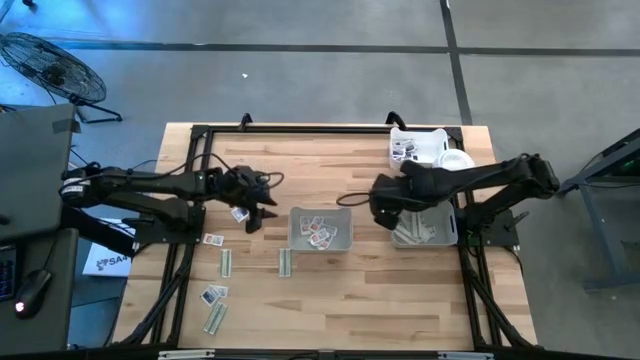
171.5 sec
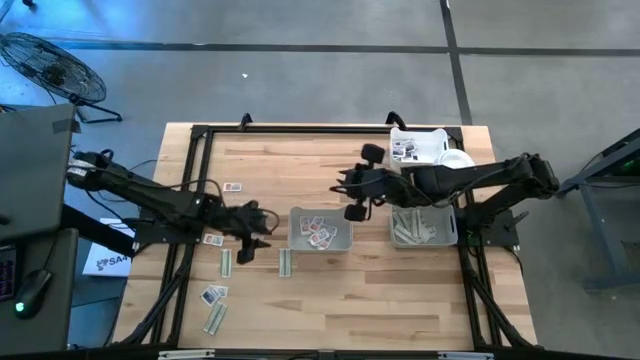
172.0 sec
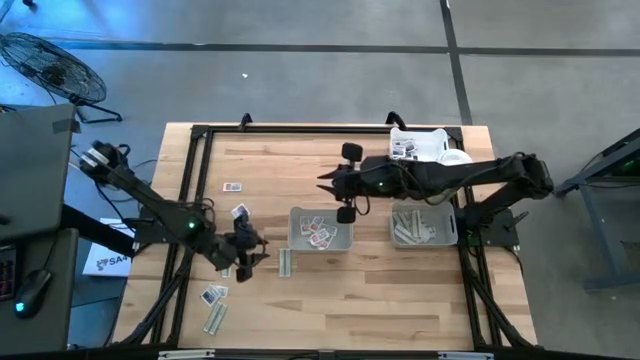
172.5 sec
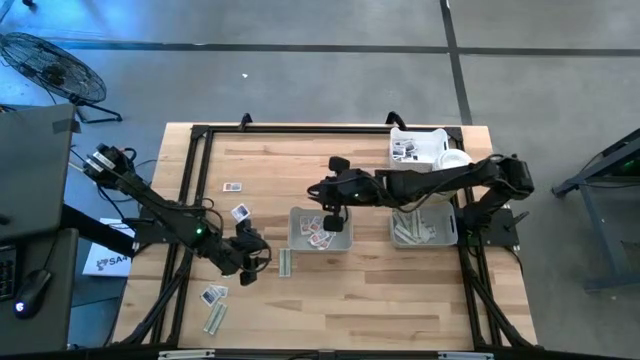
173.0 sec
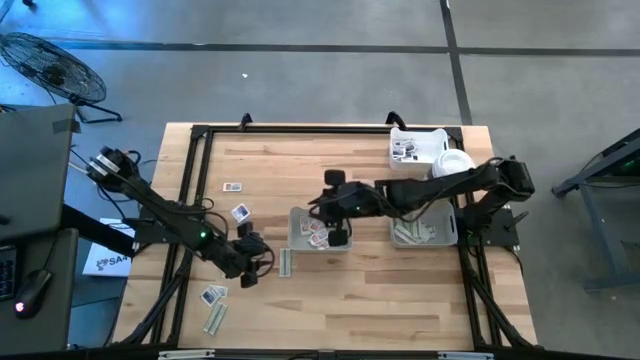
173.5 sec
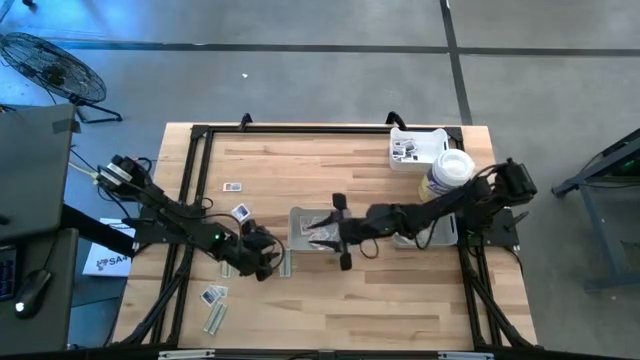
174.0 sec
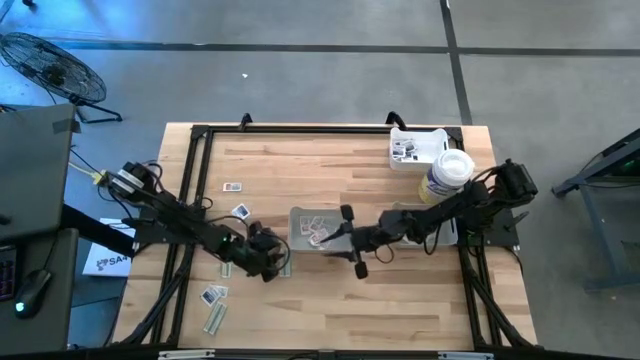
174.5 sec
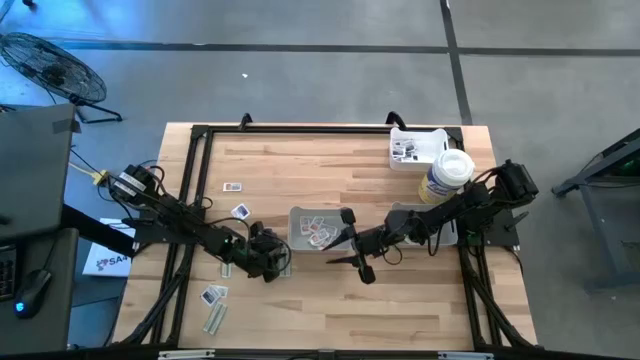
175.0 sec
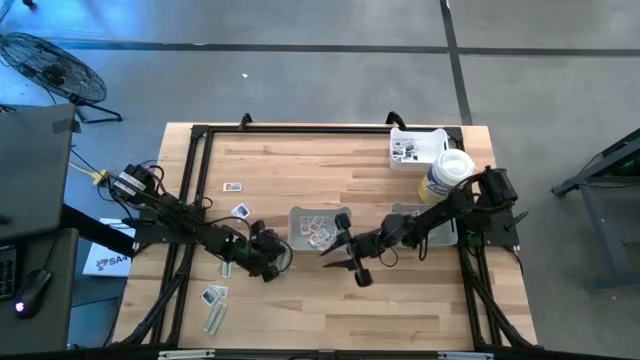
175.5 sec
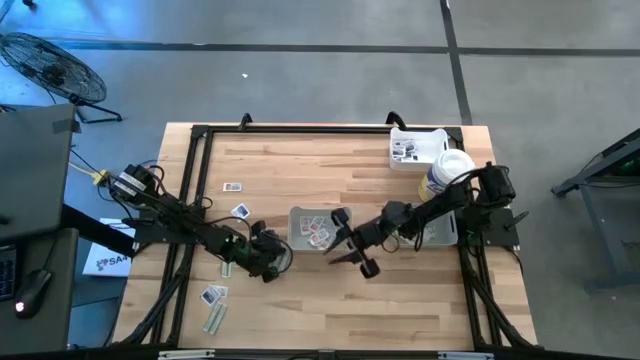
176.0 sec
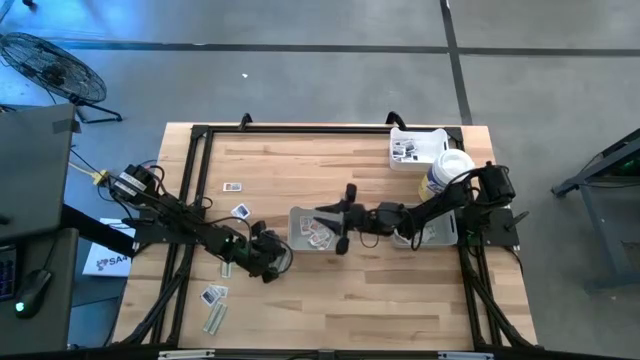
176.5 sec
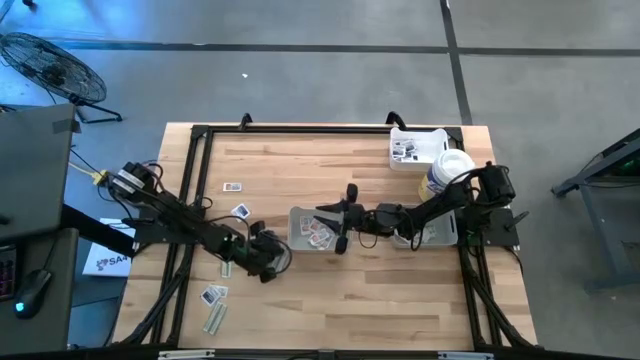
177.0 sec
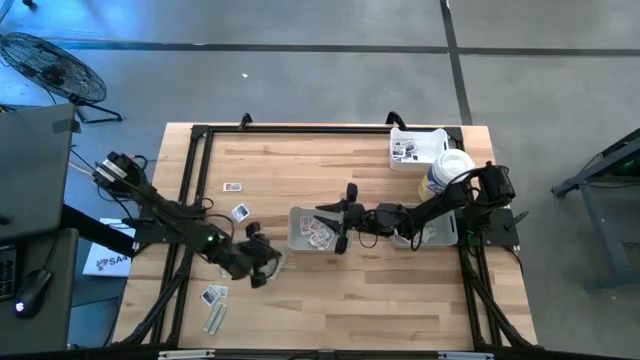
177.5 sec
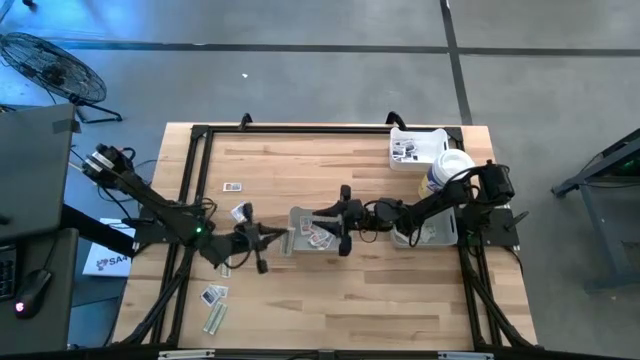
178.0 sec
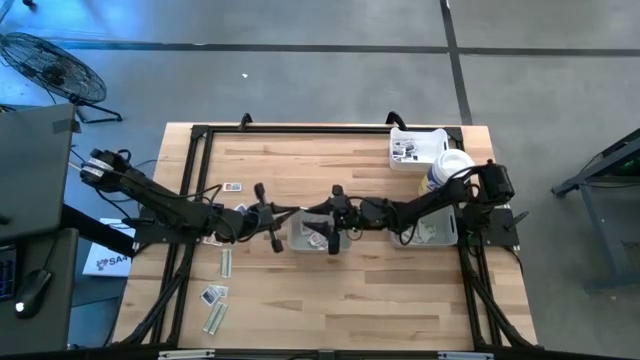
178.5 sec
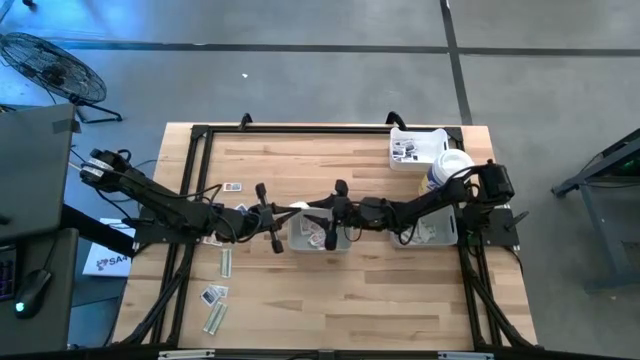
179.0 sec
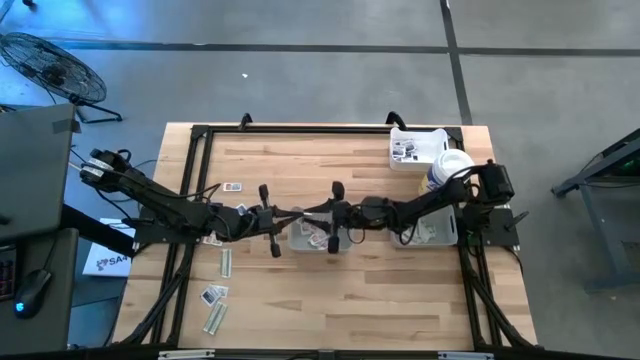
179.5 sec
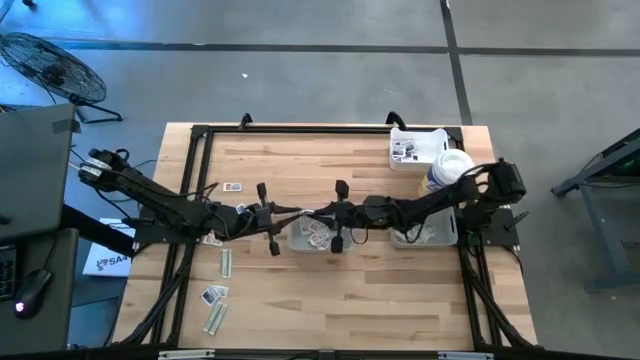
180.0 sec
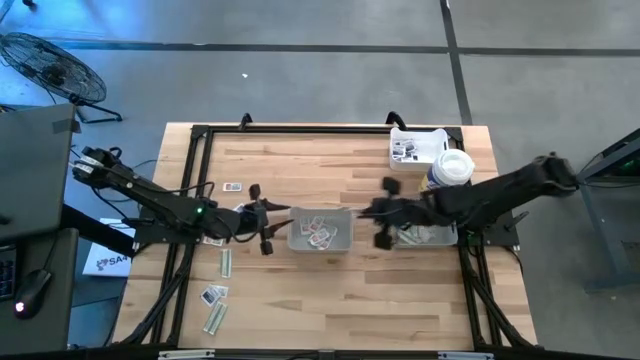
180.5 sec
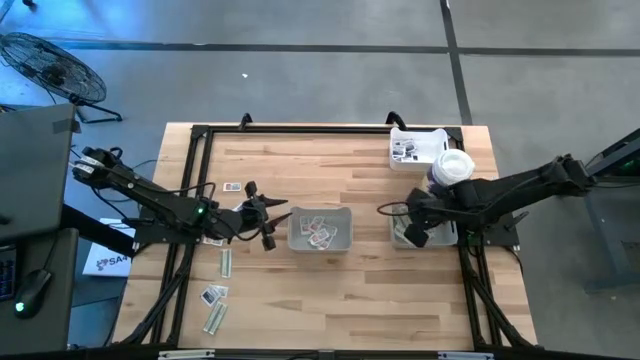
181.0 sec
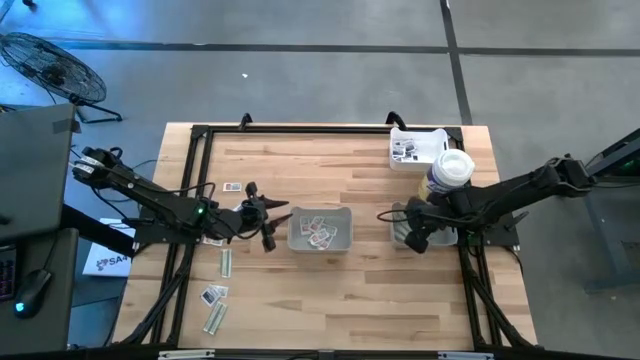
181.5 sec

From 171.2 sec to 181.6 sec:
Task: Pick & Place First Aid Supplies
Put the green pad into the right gray bin

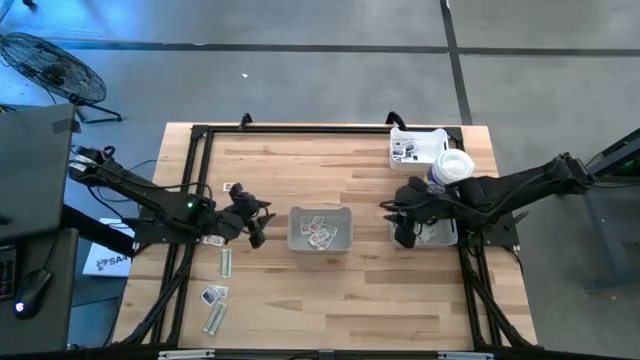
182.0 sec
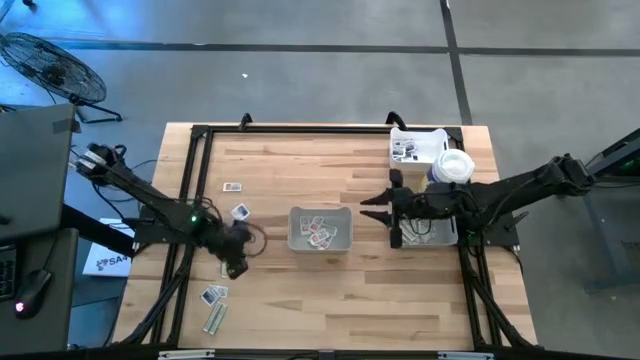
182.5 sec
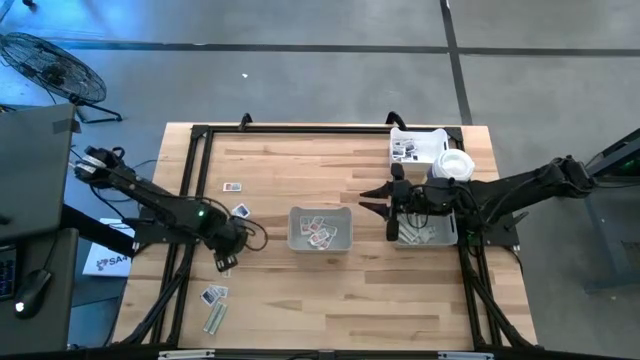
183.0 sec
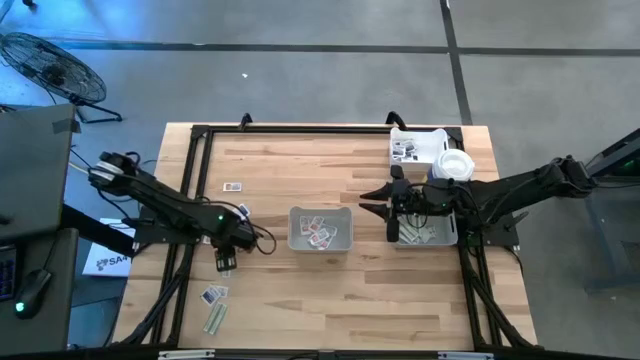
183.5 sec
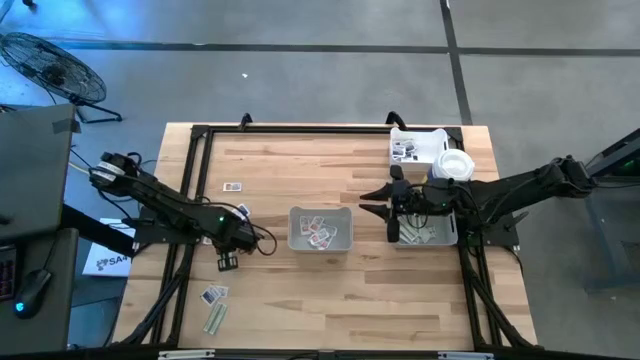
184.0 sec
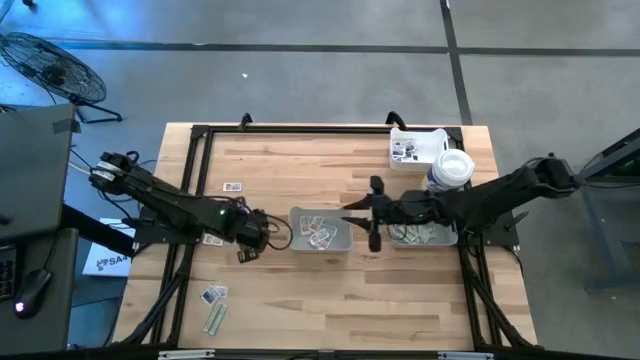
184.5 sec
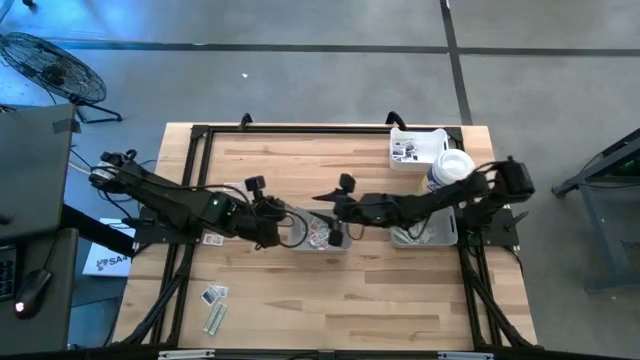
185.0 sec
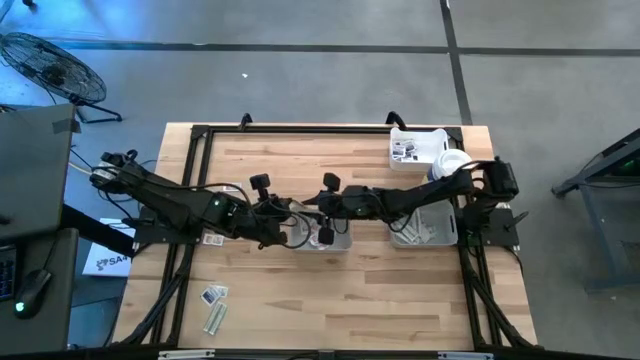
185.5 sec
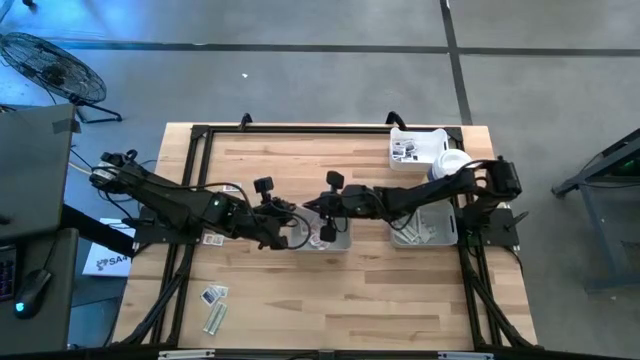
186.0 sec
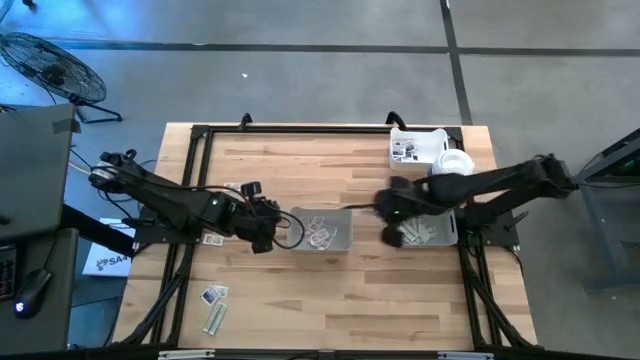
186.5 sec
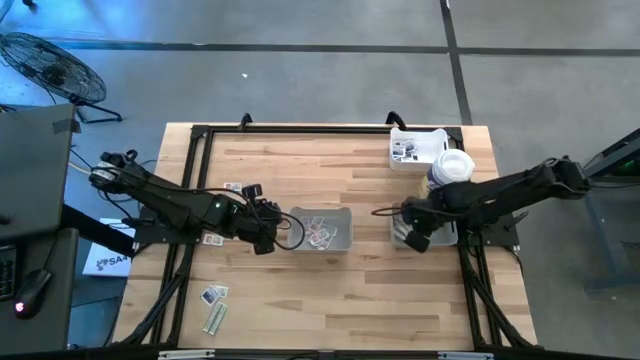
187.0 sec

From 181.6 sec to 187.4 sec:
Put the green pad into the right gray bin

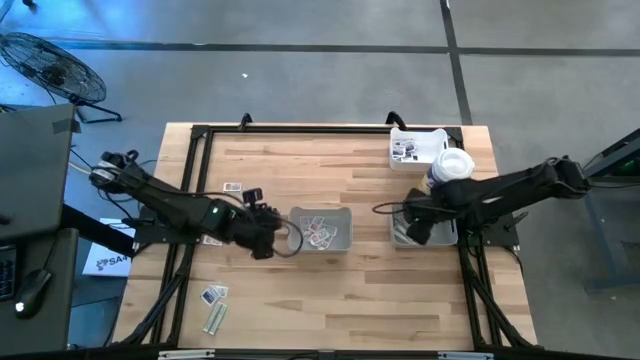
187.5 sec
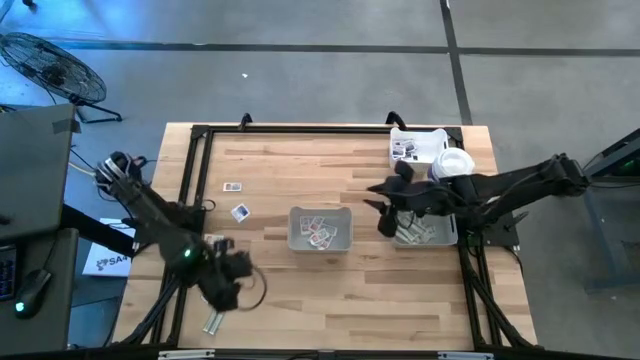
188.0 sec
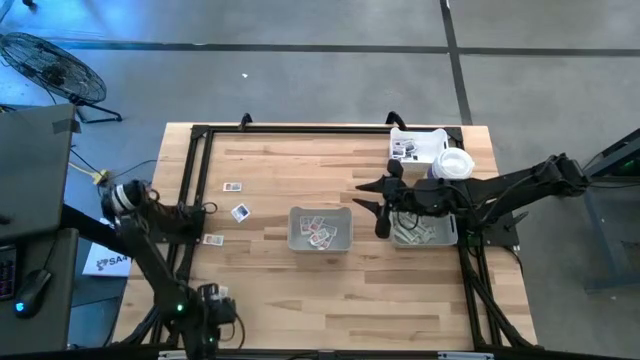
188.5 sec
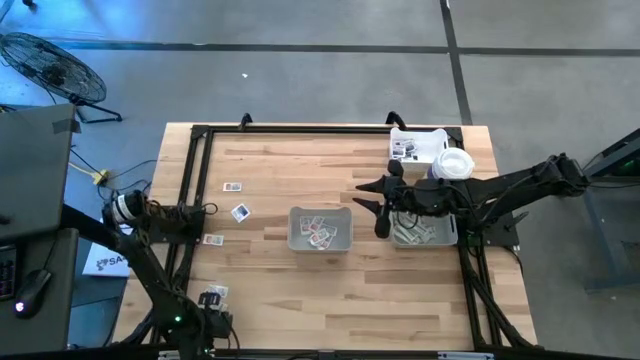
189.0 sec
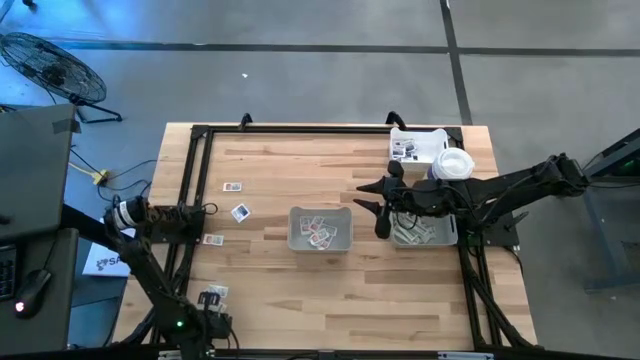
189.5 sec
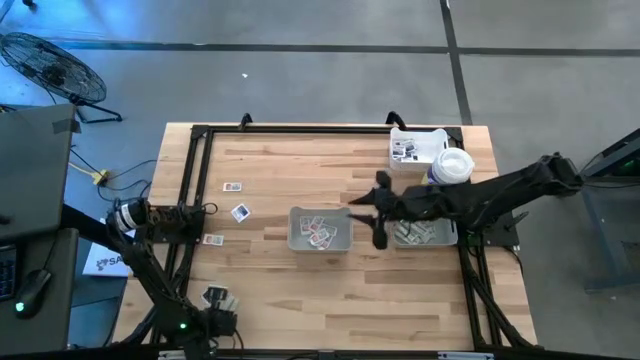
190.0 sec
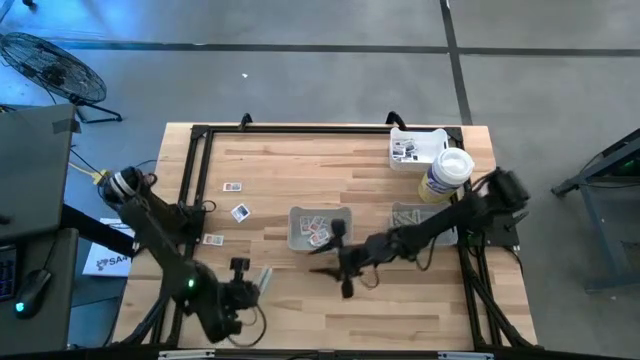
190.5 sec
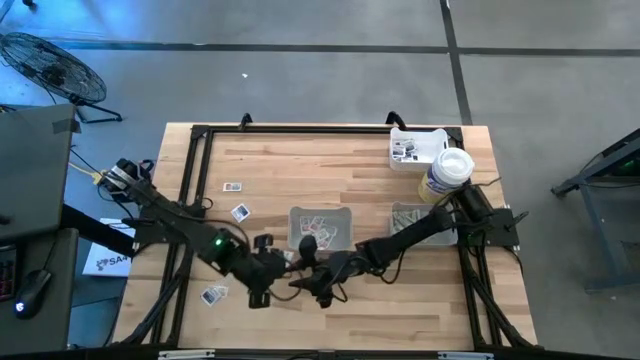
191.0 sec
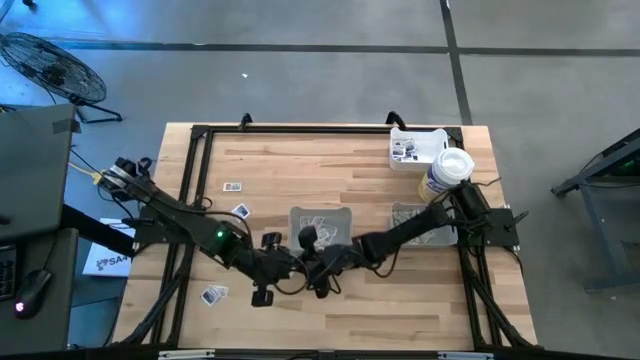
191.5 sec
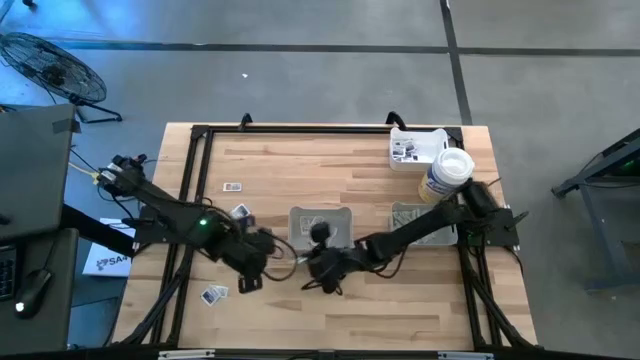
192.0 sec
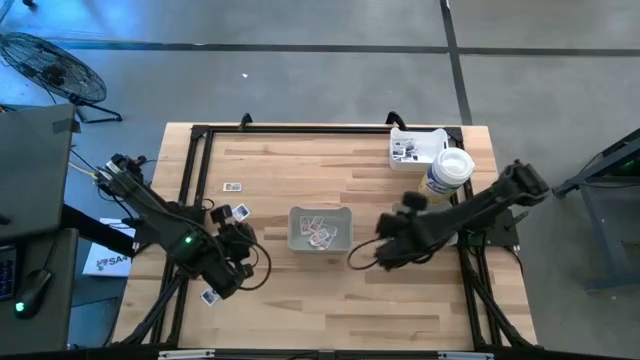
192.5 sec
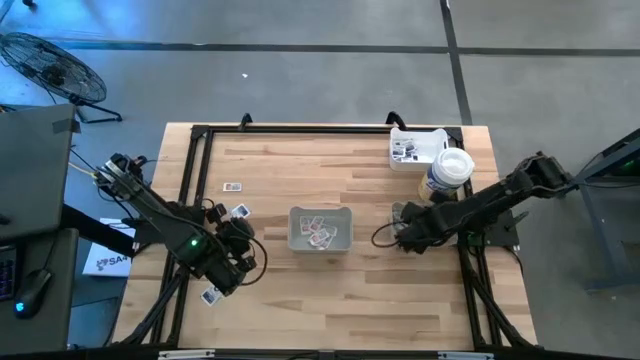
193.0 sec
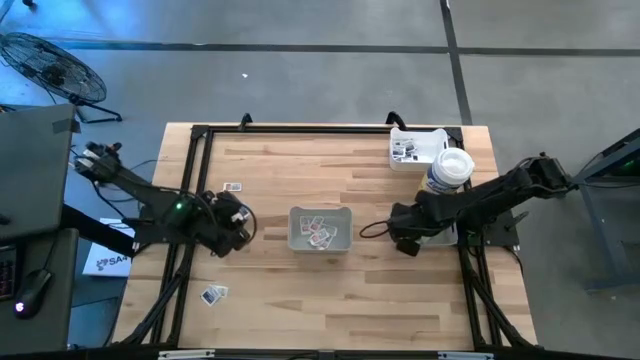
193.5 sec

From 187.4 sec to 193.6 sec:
Put the green pad into the right gray bin
